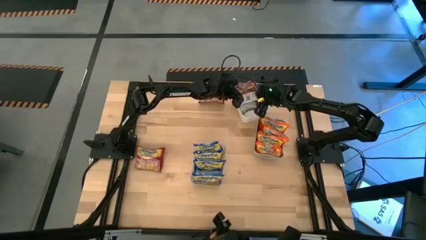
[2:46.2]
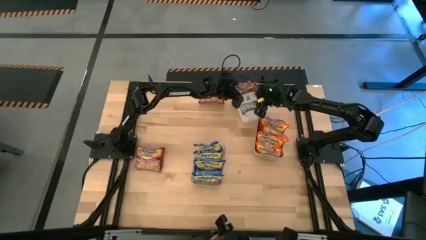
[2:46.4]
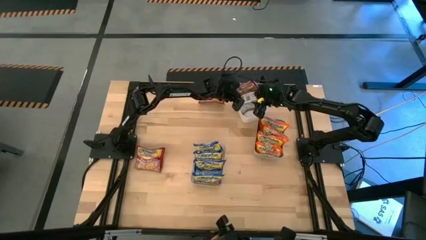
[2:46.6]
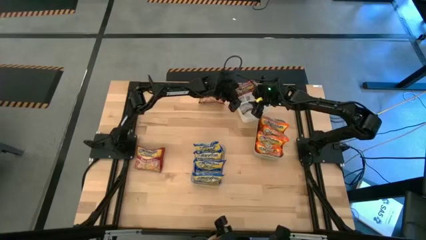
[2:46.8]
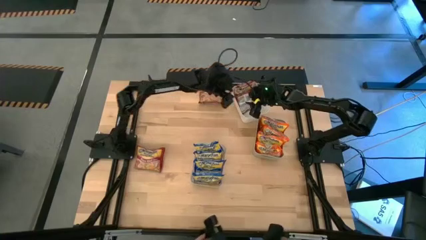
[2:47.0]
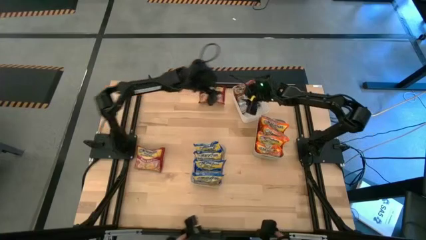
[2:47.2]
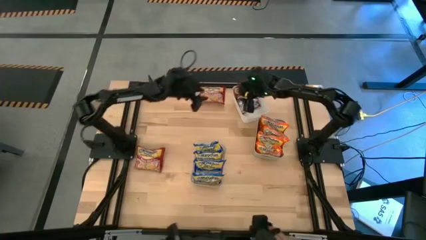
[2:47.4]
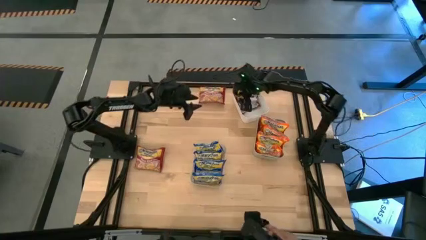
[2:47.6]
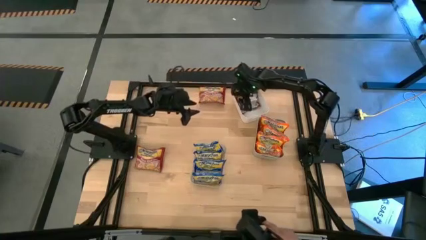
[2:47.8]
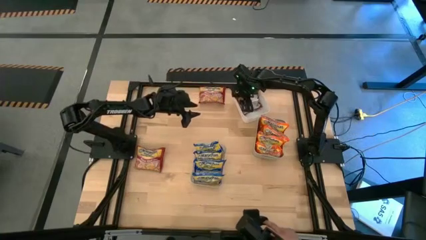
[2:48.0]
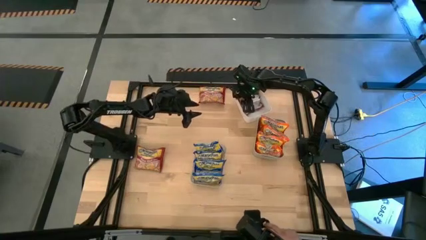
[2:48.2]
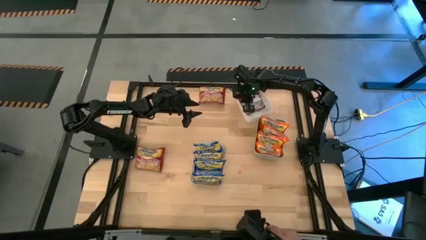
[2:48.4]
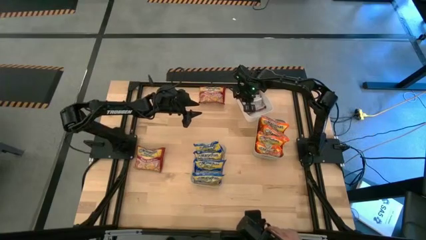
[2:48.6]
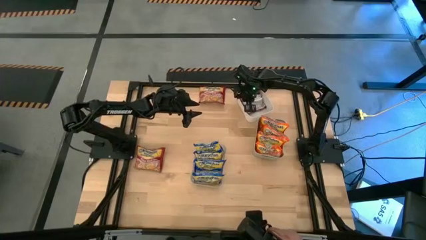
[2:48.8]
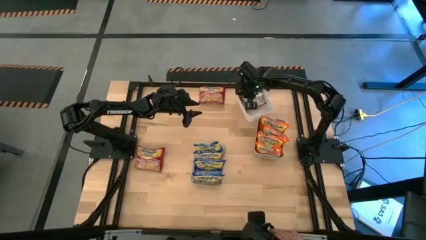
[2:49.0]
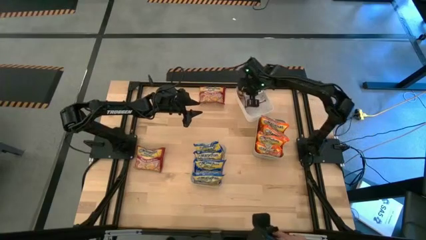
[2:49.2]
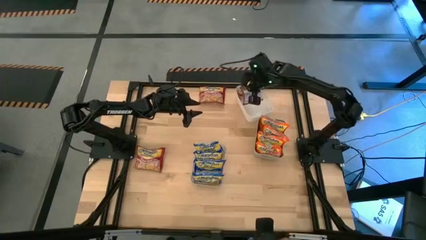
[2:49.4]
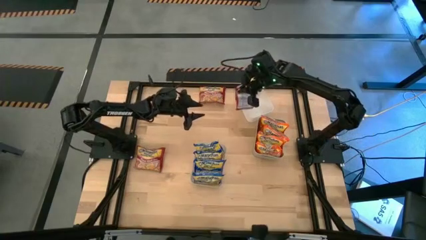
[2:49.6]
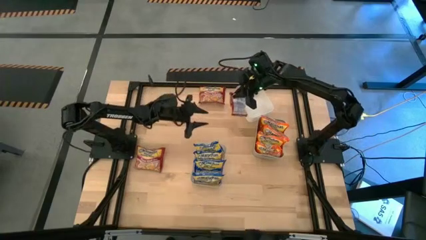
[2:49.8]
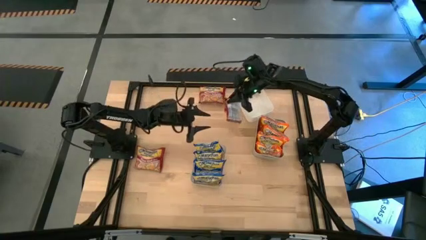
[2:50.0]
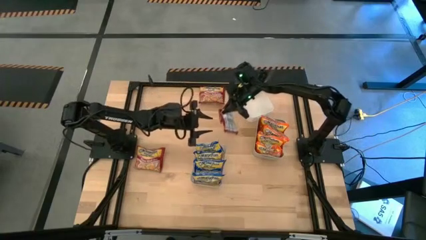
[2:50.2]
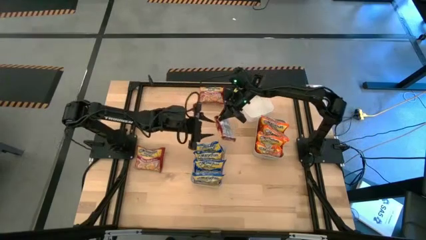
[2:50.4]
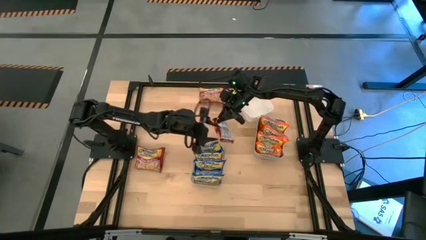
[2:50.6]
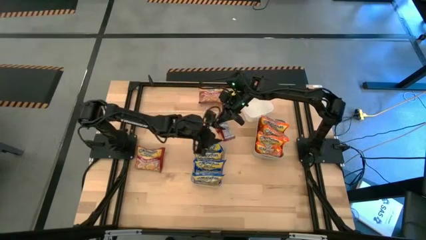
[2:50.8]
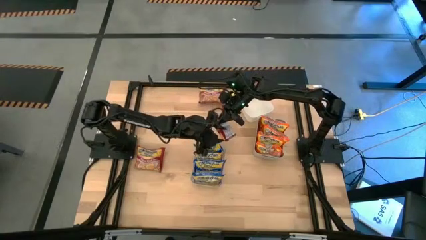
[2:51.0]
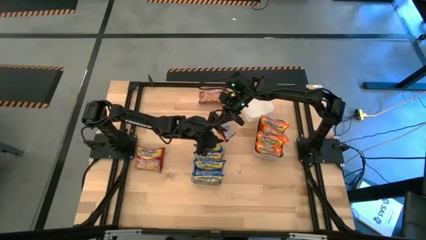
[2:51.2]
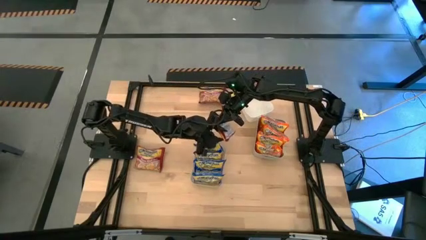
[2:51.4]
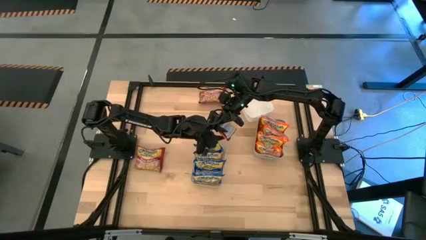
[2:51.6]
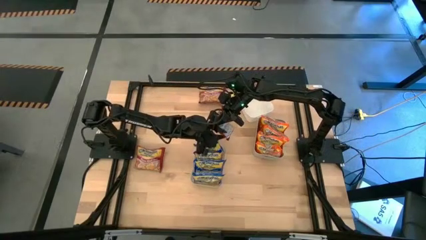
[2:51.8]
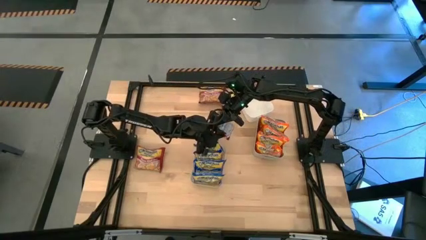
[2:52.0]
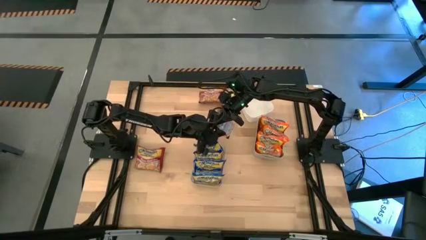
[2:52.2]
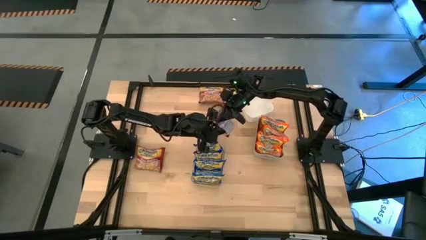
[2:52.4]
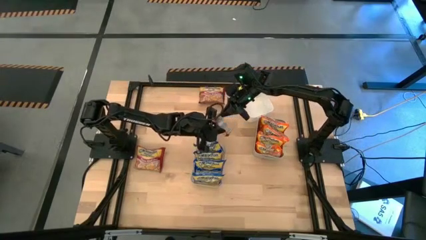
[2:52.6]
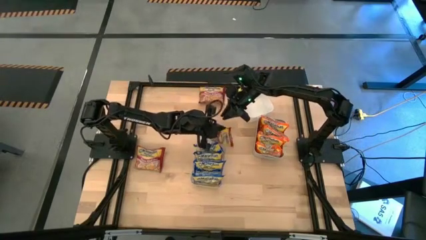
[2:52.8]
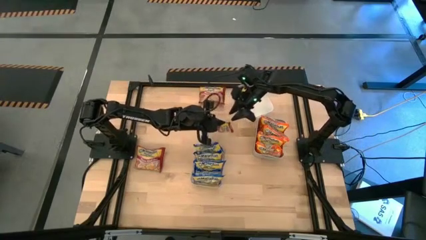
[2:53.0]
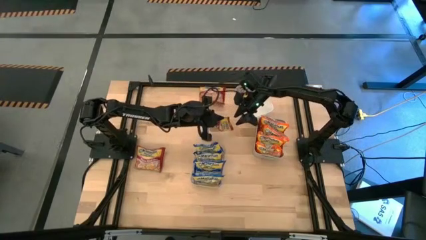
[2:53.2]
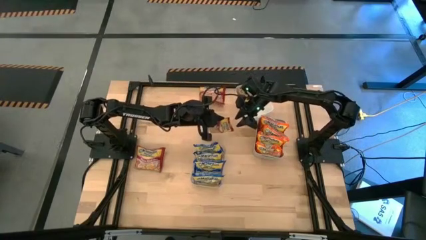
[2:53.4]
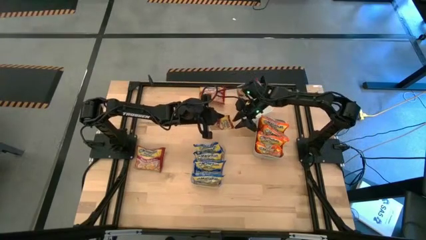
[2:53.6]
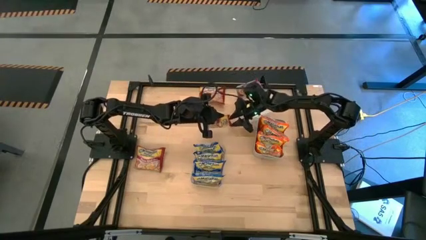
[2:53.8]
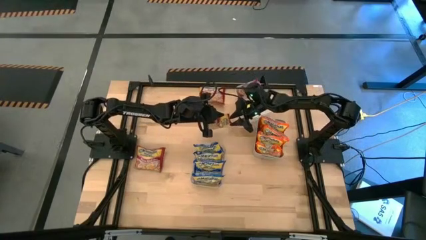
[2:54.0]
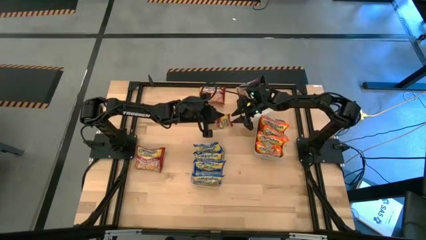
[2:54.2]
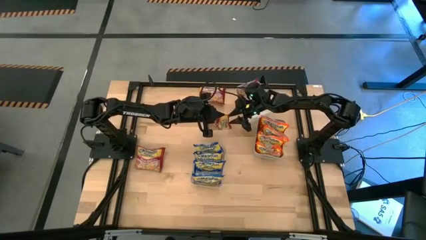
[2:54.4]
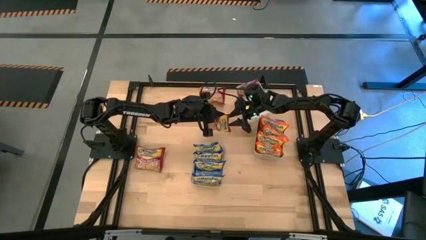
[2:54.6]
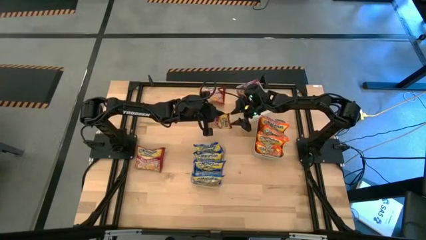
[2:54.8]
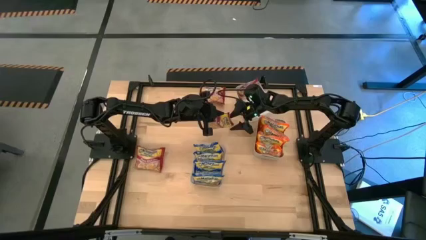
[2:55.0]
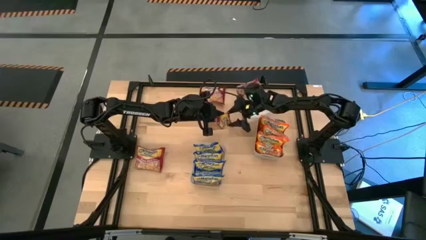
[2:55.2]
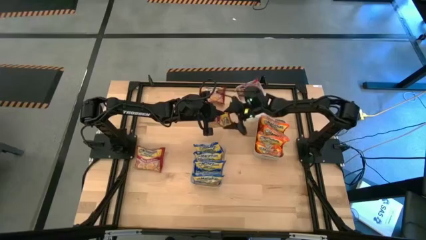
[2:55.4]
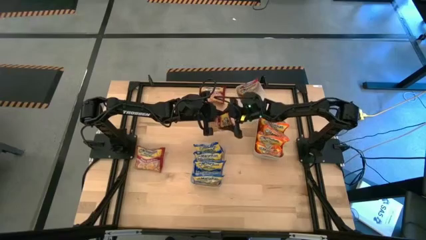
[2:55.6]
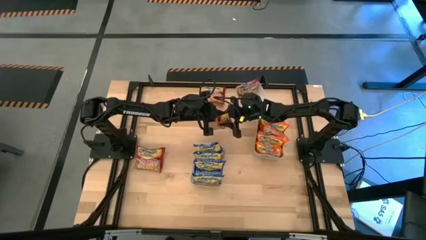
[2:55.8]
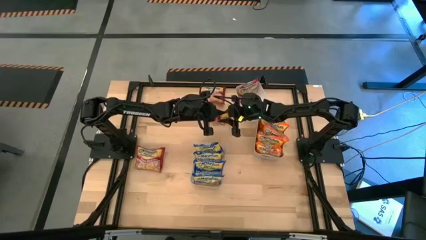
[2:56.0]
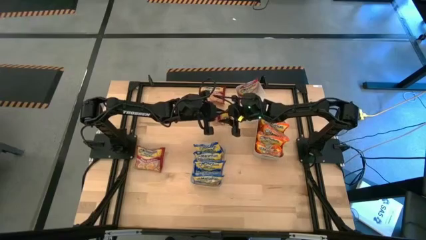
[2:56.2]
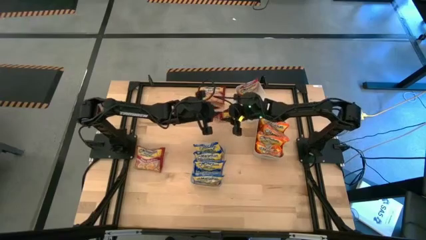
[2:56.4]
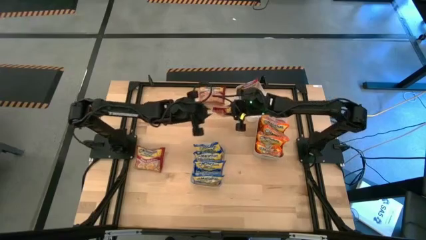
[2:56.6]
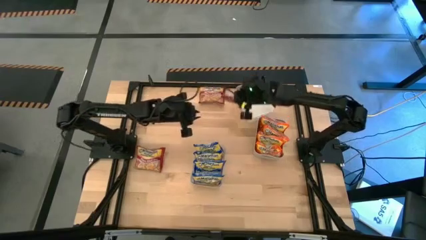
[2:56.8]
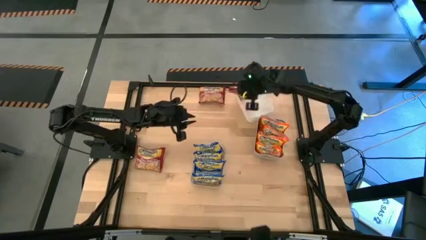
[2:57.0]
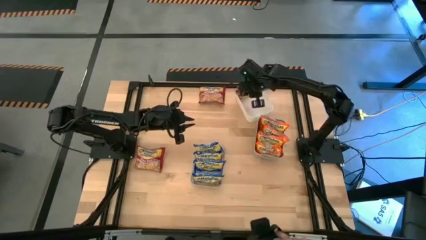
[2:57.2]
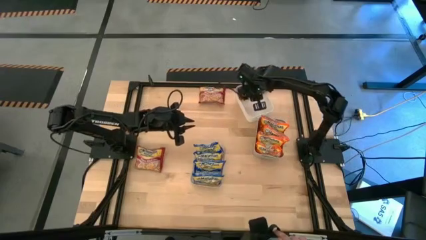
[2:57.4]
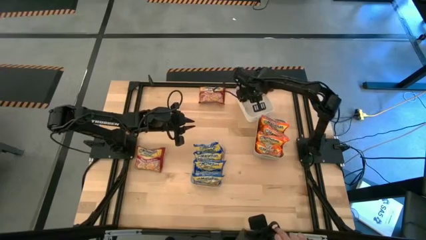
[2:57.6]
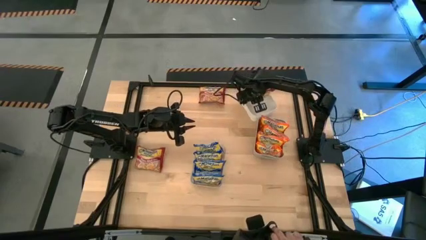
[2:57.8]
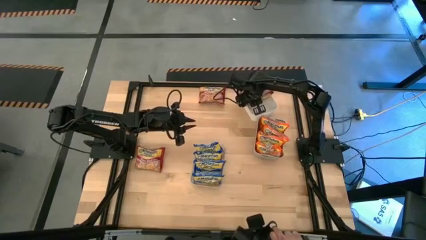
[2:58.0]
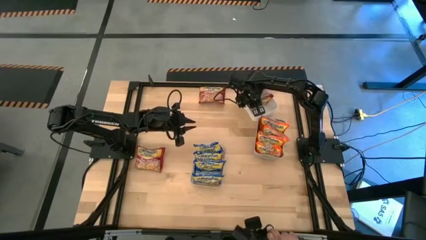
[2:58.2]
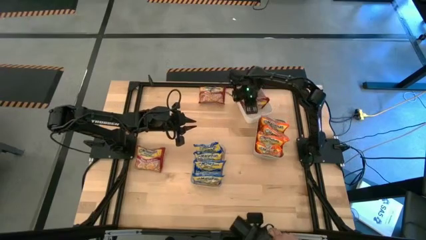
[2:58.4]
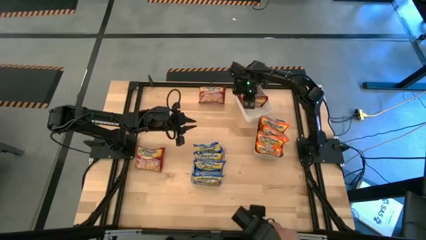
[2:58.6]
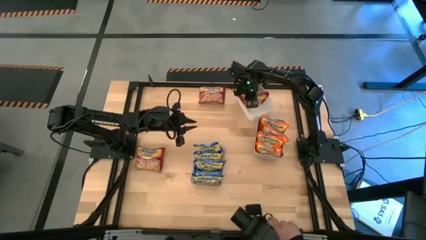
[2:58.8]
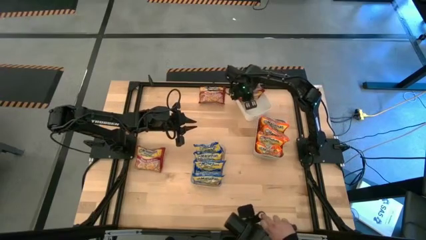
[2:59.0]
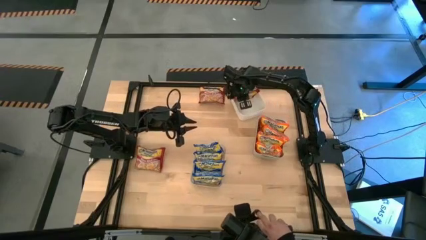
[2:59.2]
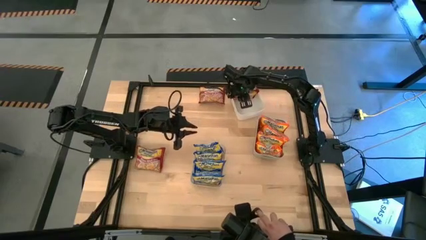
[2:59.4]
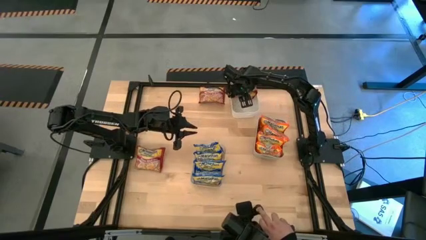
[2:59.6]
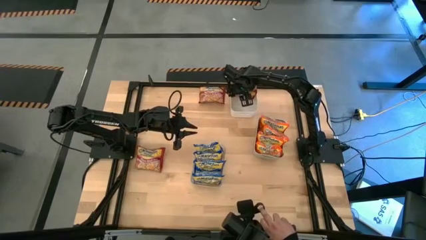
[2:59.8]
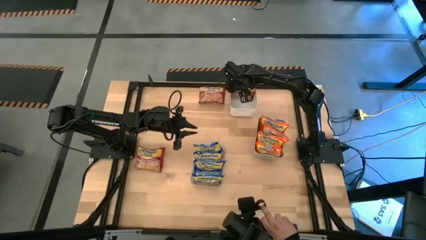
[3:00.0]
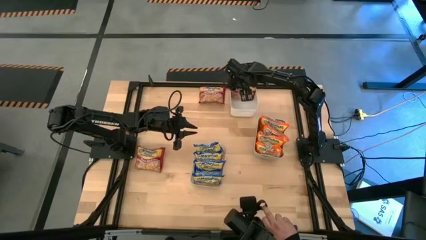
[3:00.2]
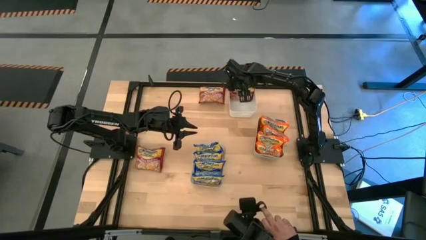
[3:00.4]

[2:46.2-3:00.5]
Task: Sort Maruchan noodles
Put the bottom right red noodle pack into the white bin
